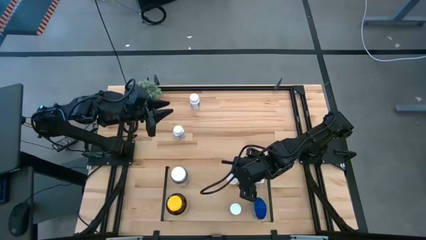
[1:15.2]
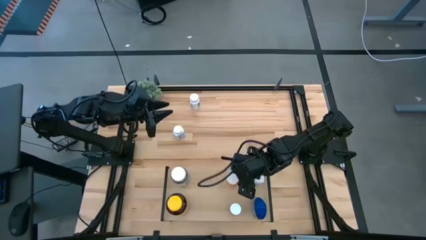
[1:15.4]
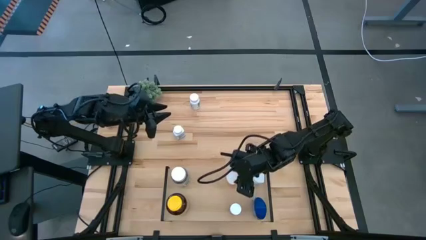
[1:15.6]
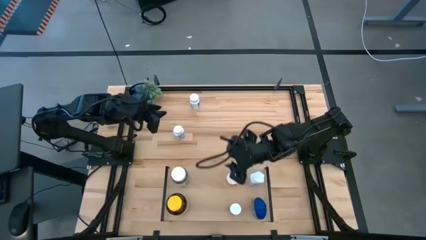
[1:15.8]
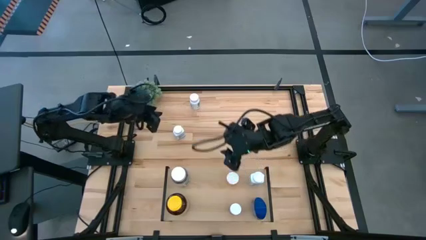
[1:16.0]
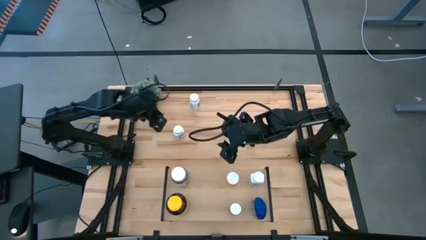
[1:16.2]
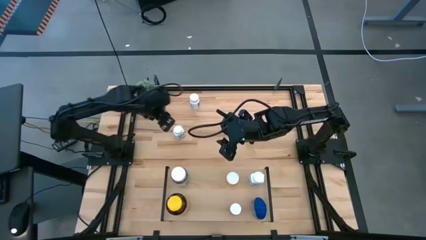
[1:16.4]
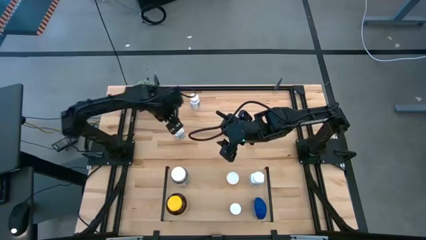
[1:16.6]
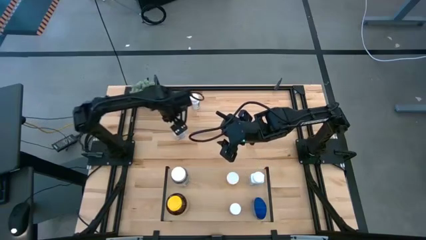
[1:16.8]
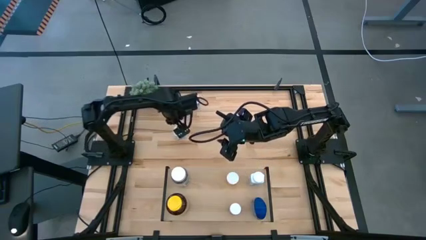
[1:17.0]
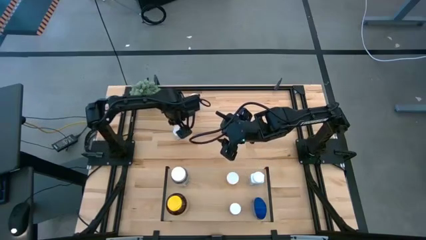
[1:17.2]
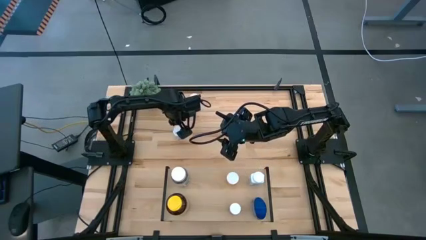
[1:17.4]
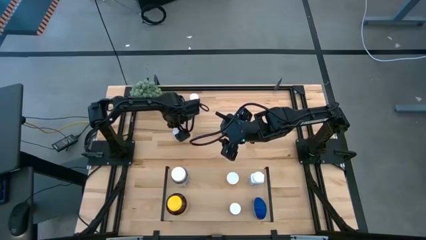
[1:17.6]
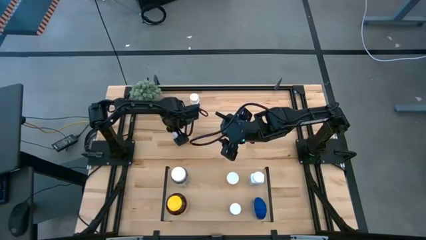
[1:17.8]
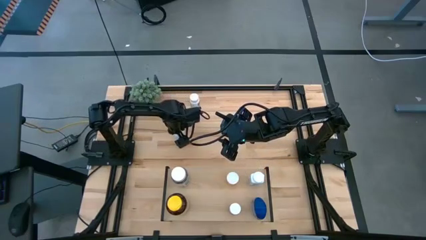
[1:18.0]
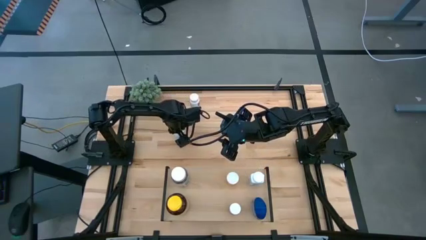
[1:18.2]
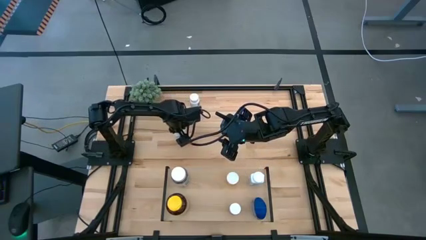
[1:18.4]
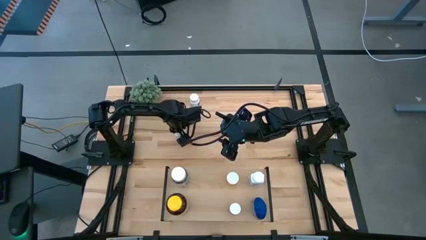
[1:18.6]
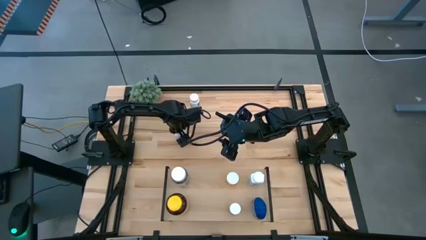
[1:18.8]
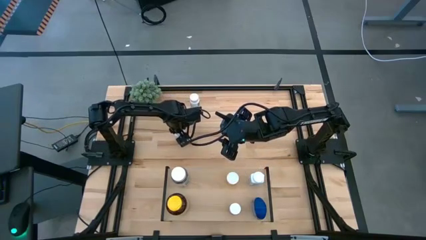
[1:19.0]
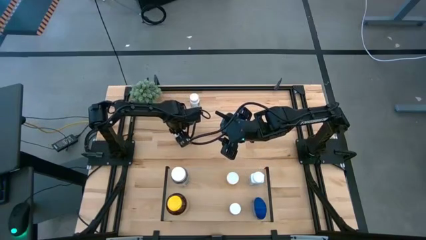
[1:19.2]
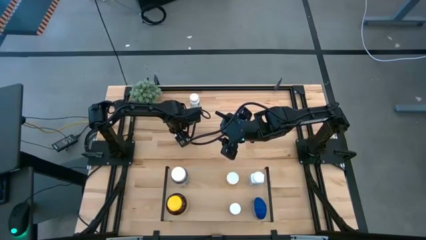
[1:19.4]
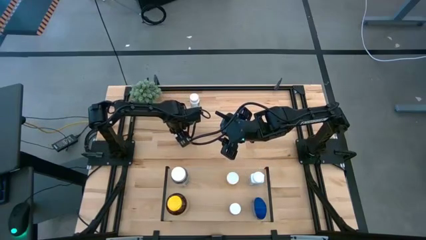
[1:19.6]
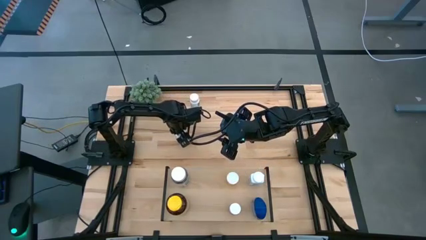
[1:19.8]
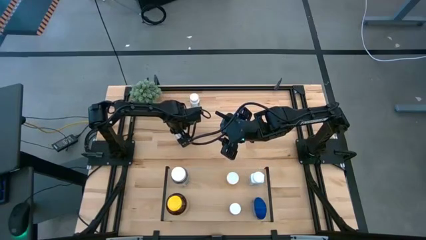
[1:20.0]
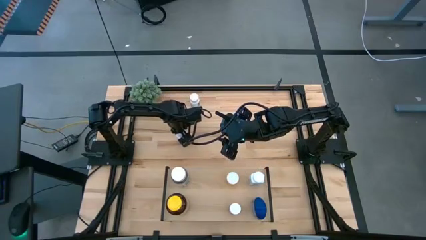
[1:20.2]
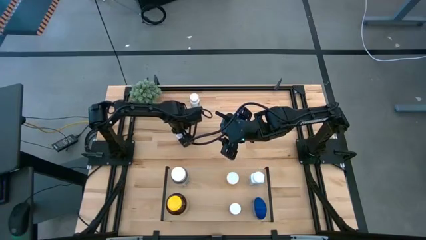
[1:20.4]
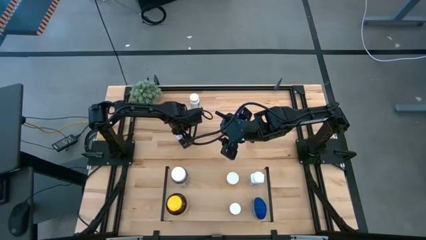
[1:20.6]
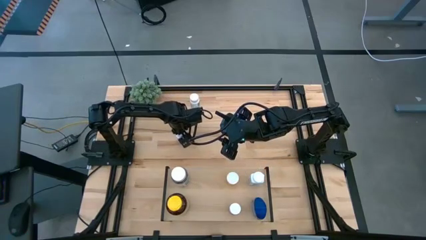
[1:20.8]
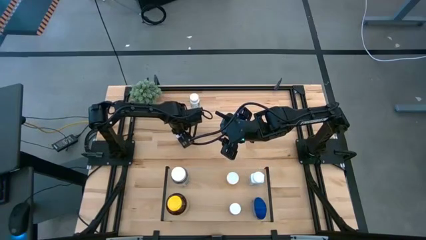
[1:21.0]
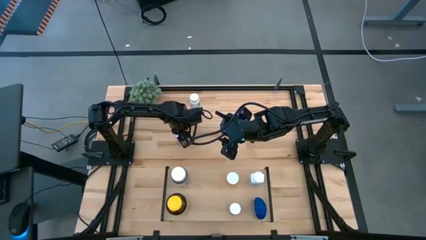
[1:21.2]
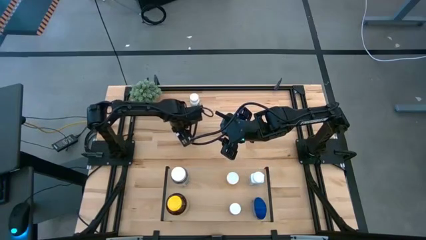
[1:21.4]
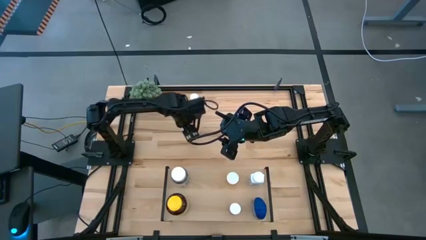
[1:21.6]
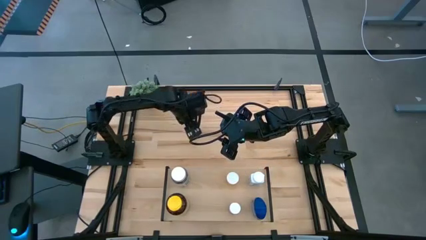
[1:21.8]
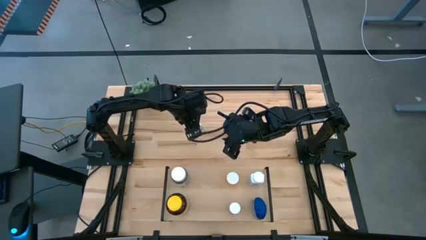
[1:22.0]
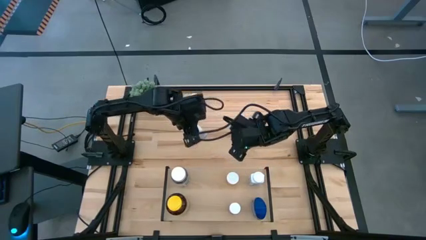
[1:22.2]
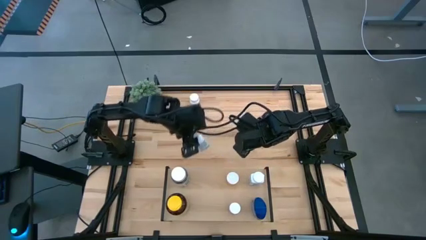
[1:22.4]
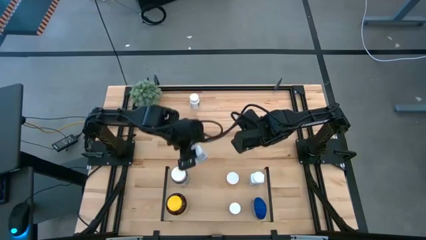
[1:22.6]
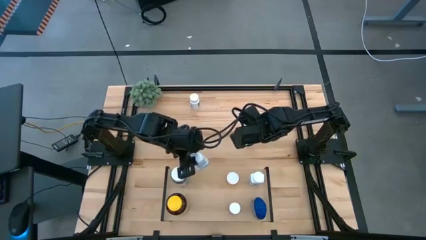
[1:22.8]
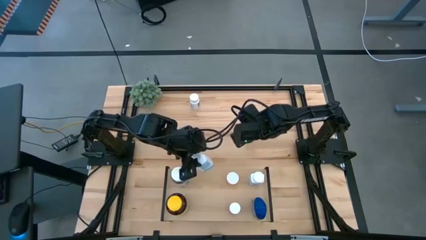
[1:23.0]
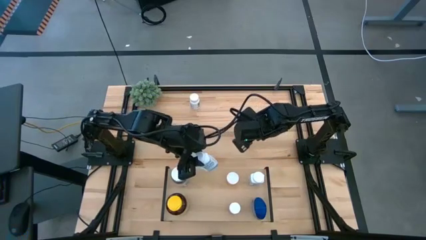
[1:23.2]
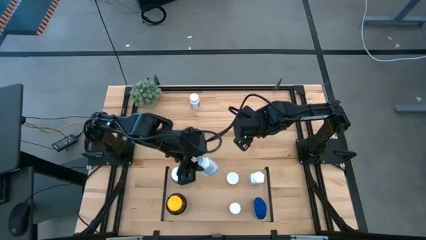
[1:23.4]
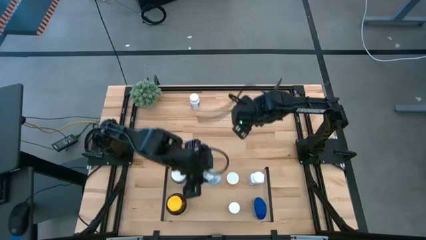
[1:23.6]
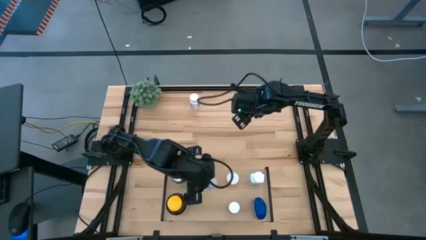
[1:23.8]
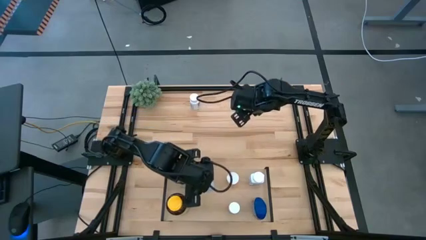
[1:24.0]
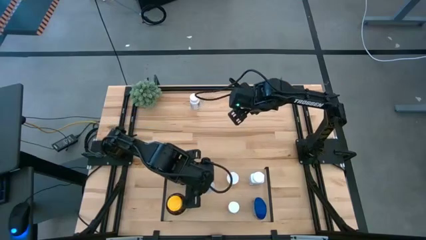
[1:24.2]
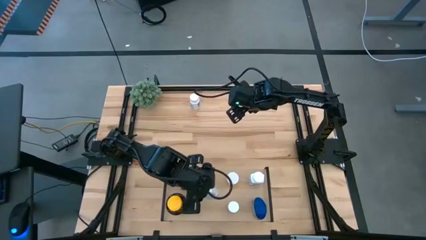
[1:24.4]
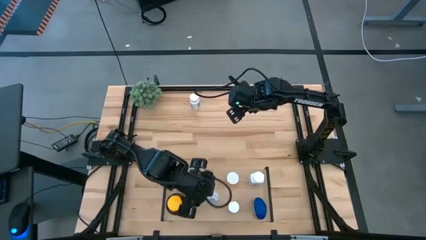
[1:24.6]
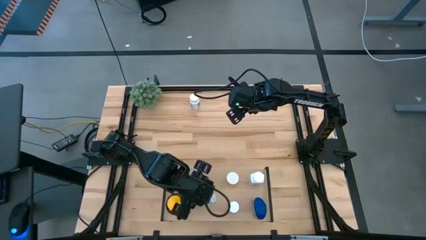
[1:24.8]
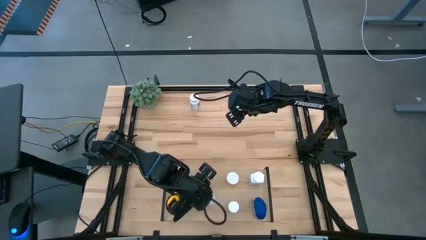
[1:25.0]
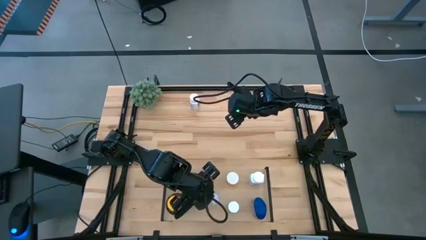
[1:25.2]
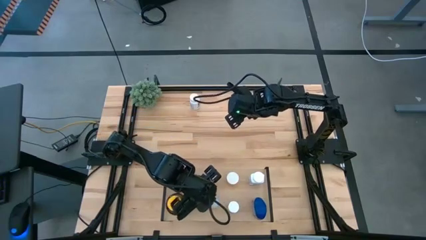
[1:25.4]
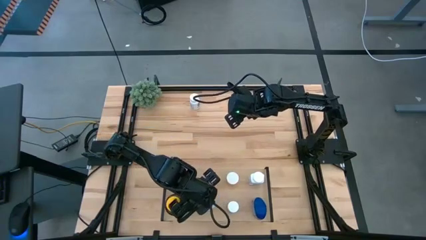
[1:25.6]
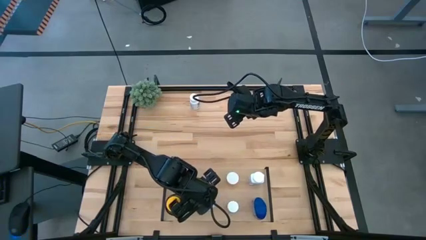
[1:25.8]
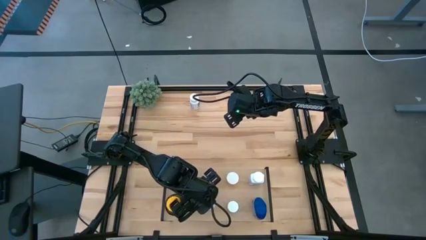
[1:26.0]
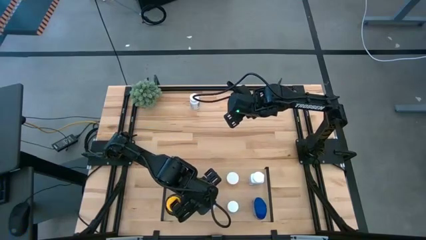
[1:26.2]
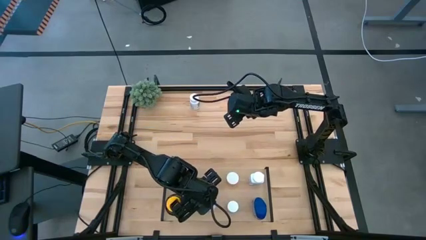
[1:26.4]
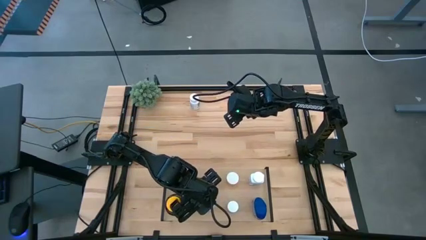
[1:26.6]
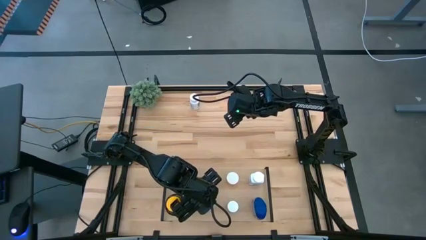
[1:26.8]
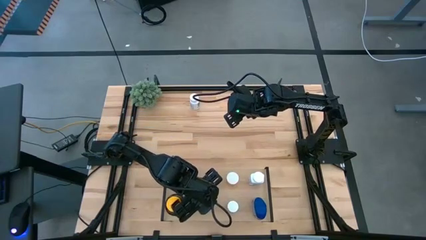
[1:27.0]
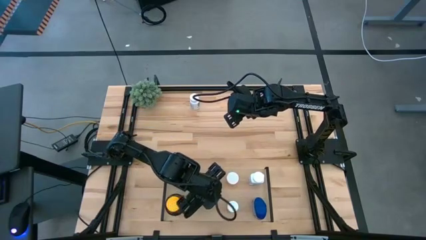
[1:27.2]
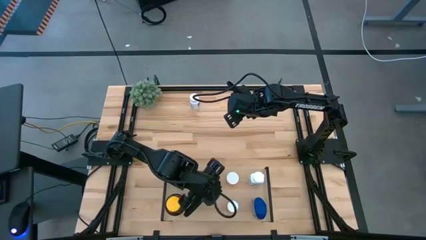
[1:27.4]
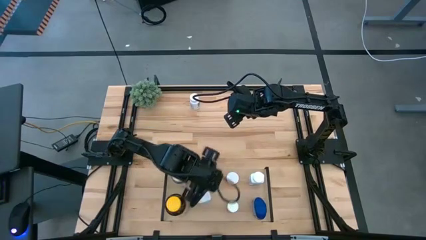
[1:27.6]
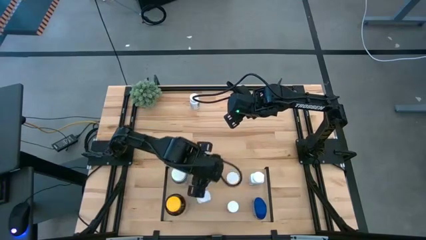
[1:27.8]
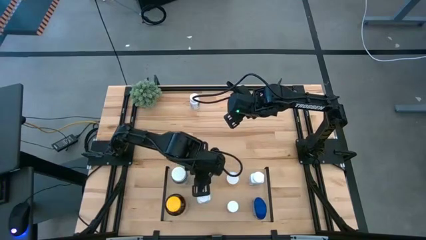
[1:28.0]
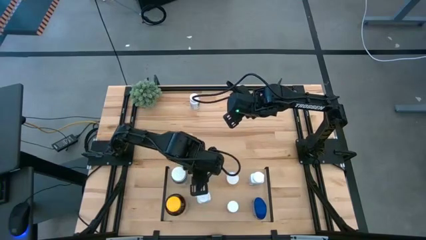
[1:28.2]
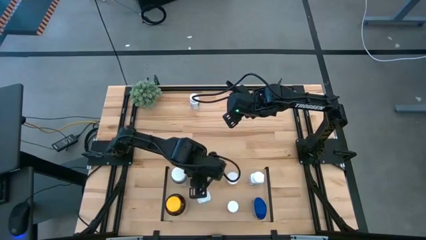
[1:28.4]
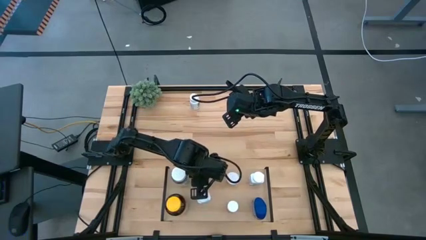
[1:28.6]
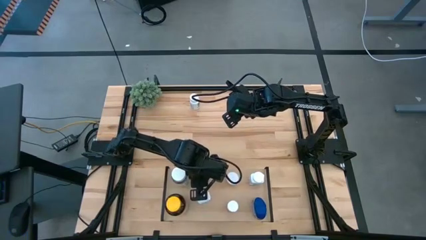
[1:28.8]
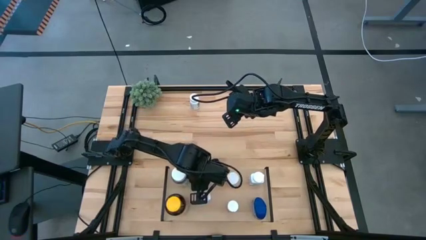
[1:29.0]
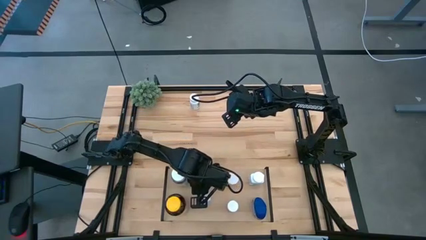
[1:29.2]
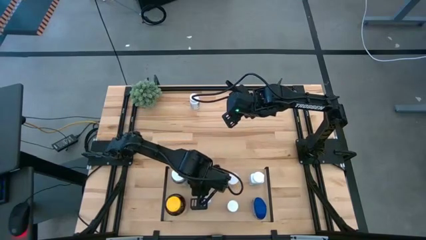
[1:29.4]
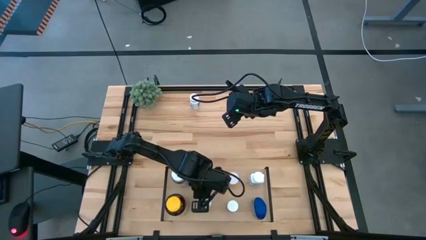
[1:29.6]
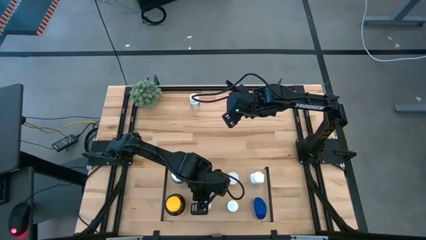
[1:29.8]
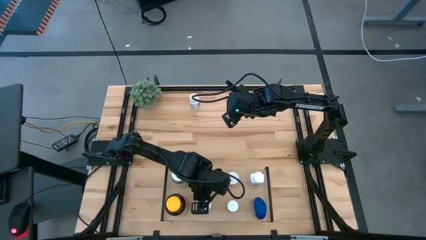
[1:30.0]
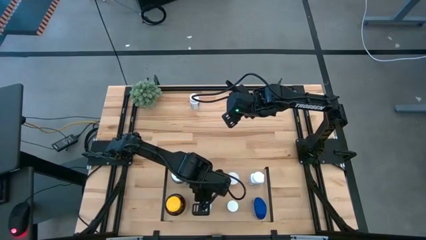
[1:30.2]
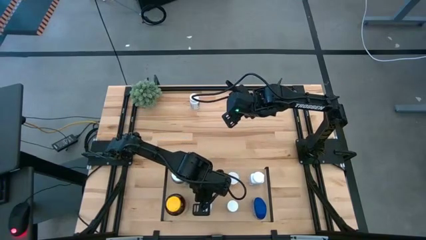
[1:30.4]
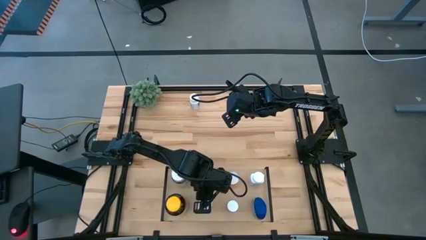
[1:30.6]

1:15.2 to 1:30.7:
Task: Pick and place medicine bottles onto shelf by color
Put the white blue pill bottle on the shelf
